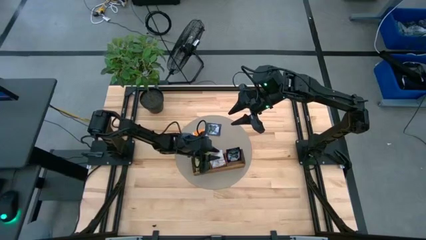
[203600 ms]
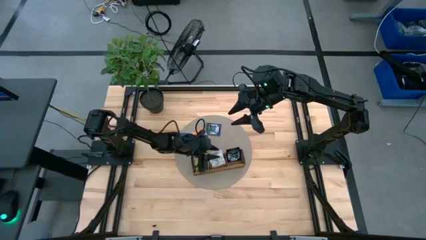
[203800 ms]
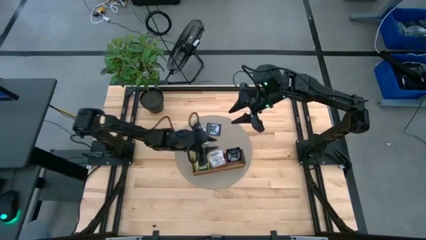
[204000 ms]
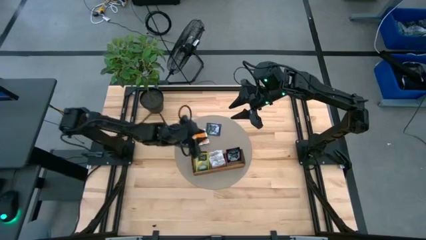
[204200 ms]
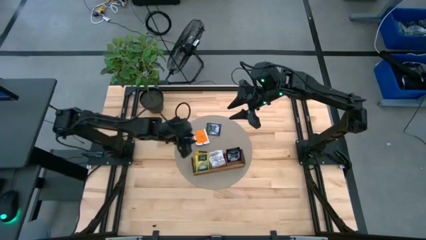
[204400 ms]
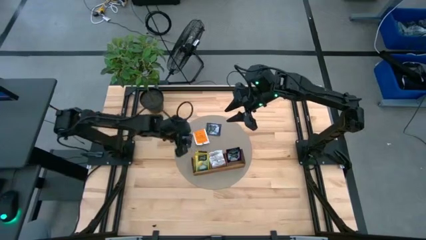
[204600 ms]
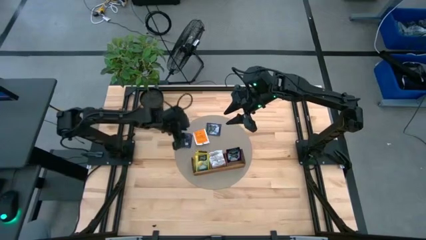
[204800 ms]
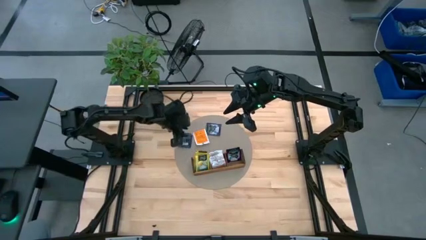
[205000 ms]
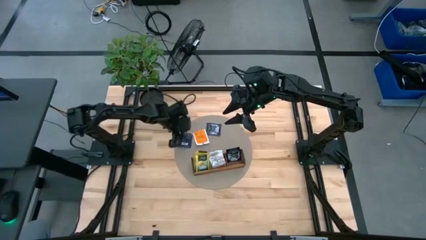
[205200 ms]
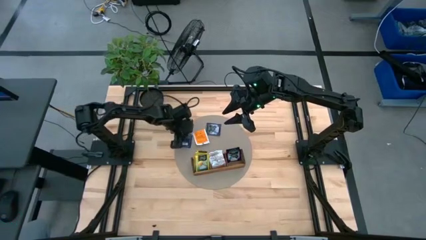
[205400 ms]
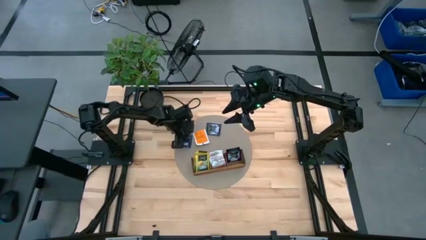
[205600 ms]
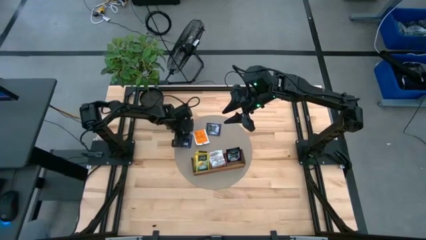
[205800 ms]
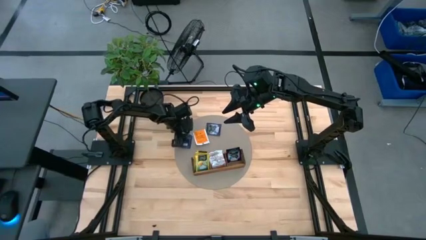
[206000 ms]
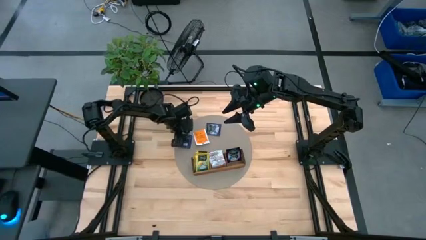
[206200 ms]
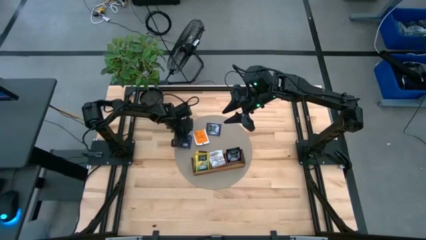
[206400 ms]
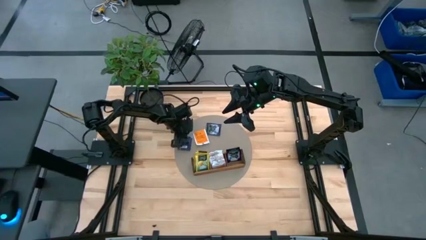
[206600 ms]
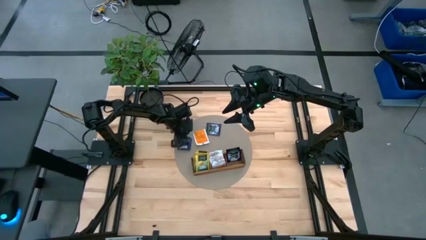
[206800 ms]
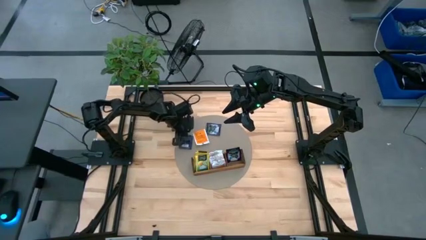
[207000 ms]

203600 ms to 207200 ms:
Task: Pick & Place Tea
Put the violet tea bag into the right section of the wooden organizer

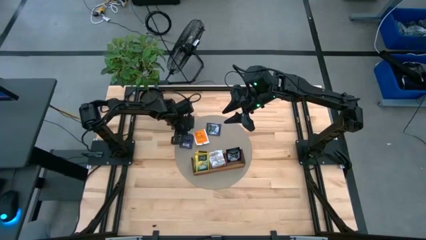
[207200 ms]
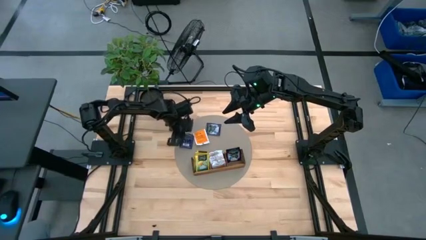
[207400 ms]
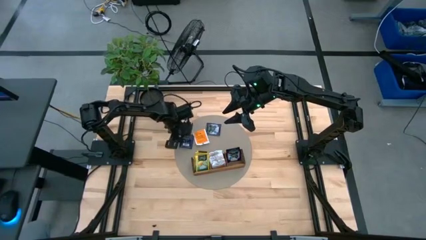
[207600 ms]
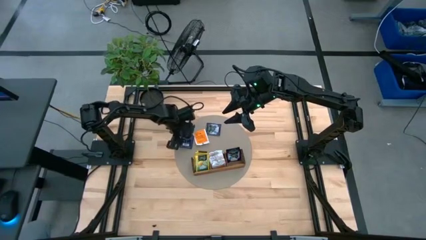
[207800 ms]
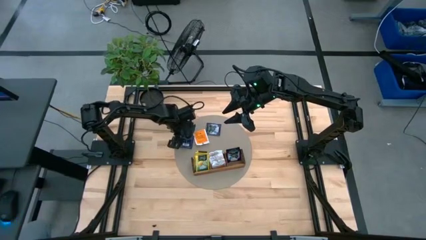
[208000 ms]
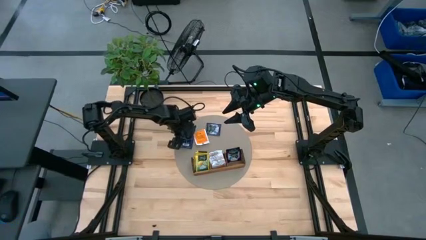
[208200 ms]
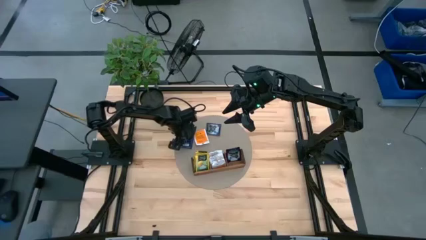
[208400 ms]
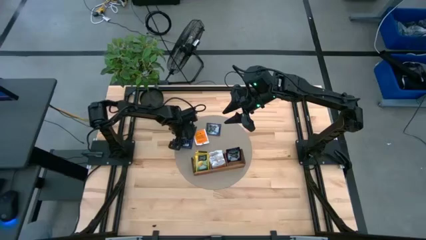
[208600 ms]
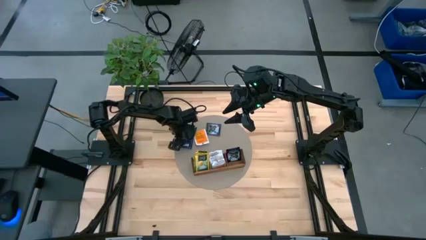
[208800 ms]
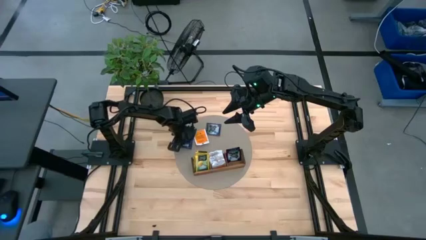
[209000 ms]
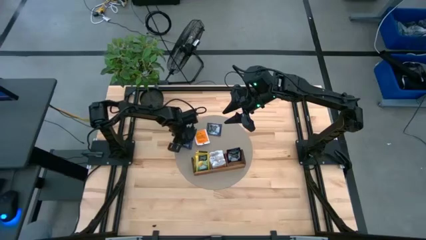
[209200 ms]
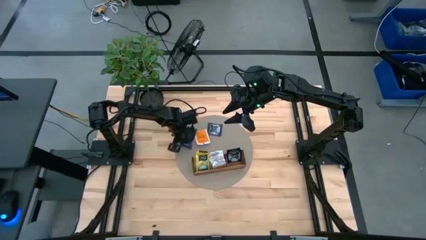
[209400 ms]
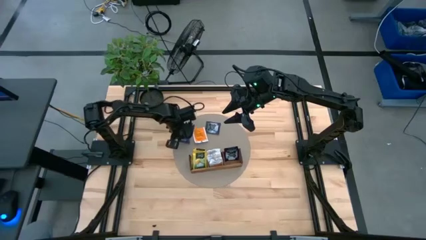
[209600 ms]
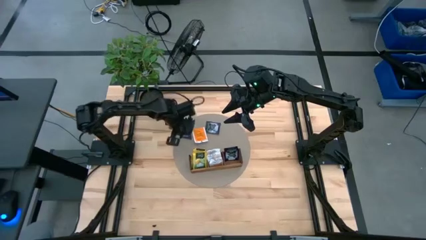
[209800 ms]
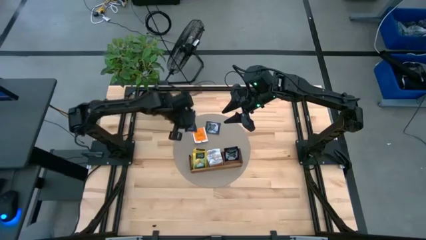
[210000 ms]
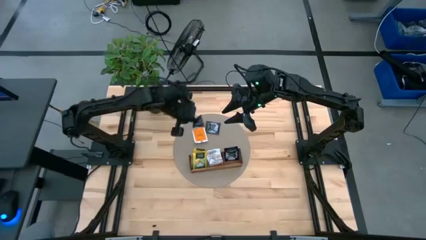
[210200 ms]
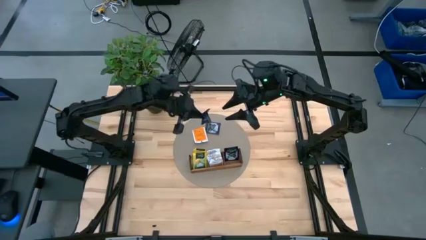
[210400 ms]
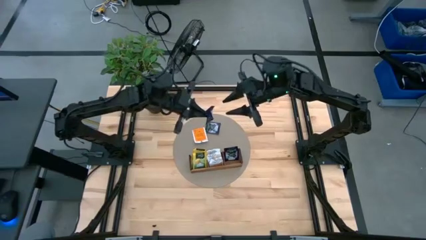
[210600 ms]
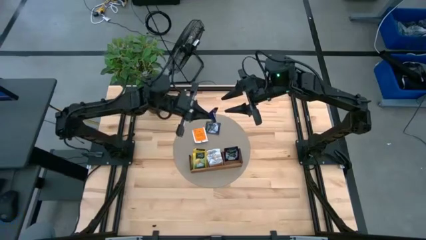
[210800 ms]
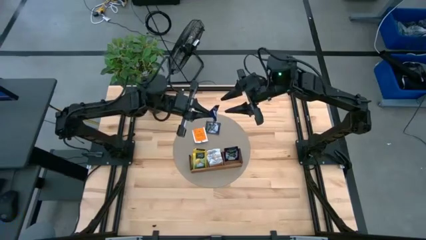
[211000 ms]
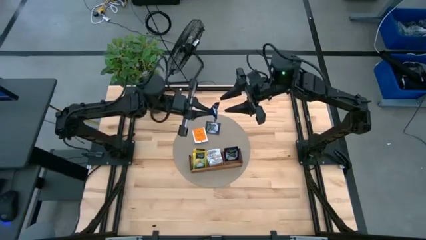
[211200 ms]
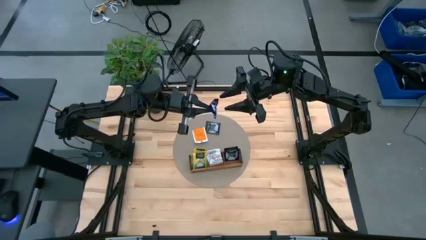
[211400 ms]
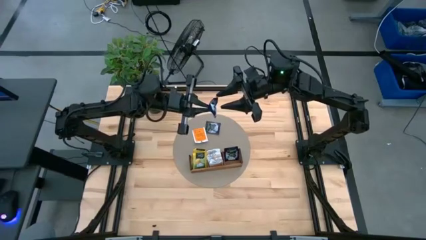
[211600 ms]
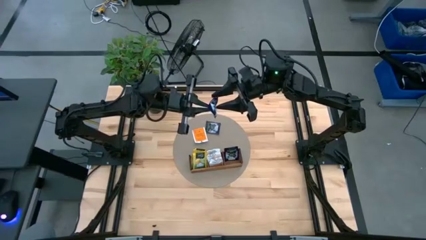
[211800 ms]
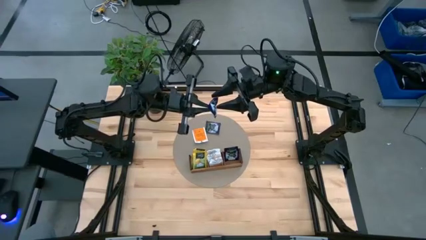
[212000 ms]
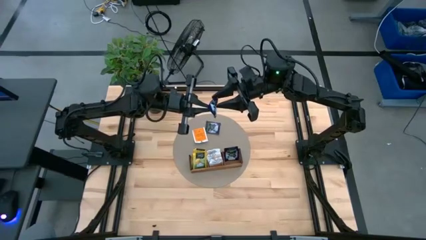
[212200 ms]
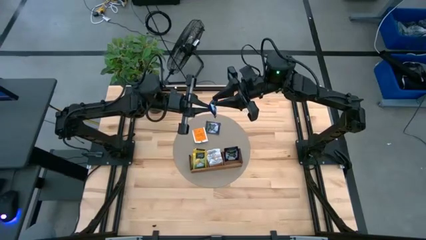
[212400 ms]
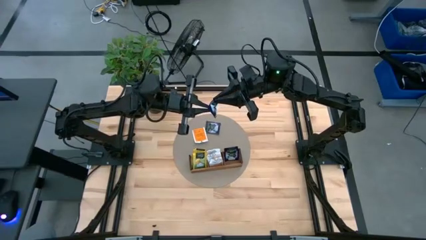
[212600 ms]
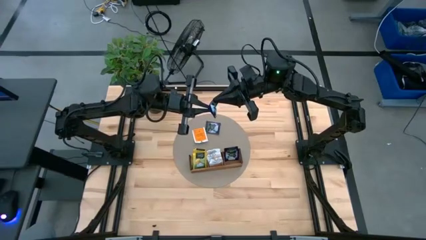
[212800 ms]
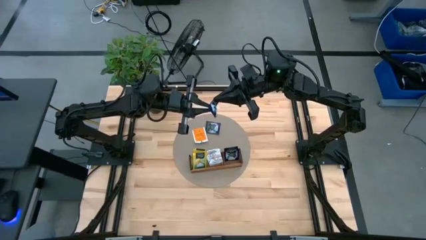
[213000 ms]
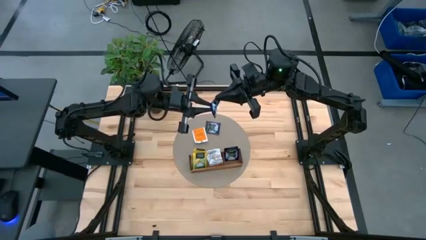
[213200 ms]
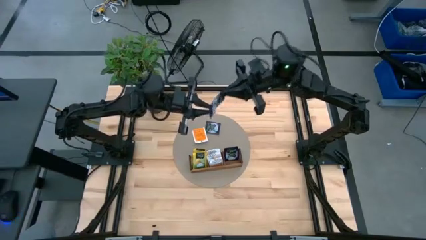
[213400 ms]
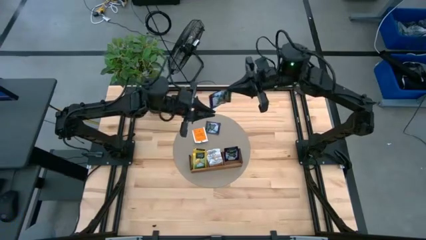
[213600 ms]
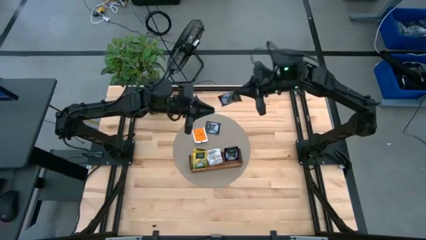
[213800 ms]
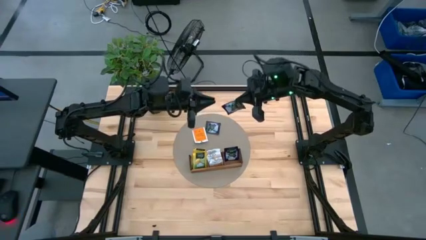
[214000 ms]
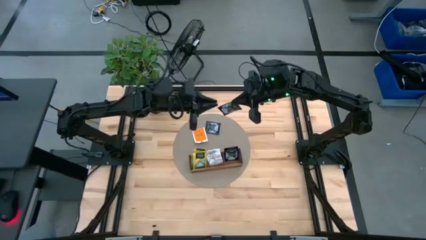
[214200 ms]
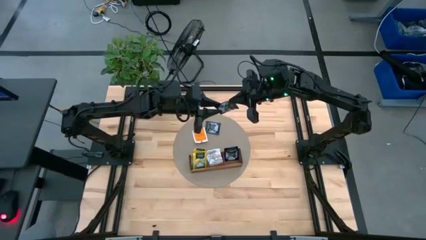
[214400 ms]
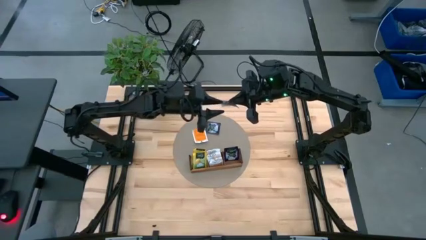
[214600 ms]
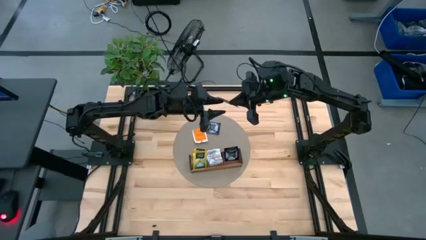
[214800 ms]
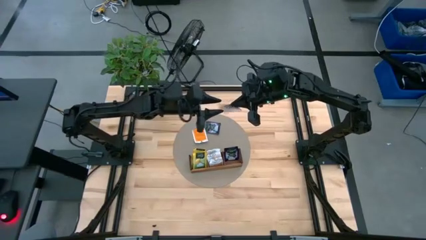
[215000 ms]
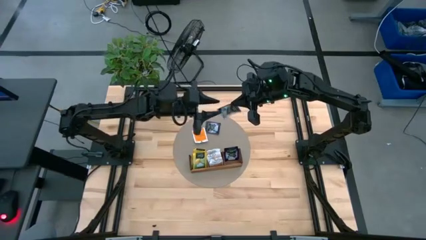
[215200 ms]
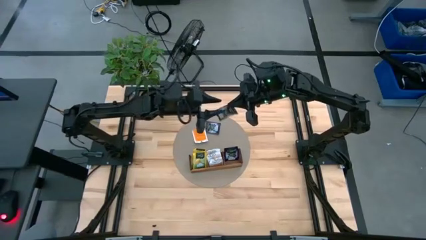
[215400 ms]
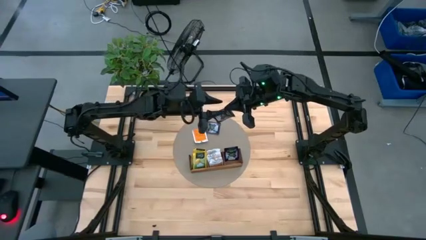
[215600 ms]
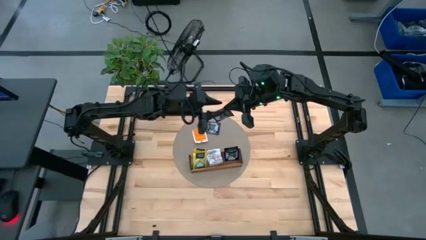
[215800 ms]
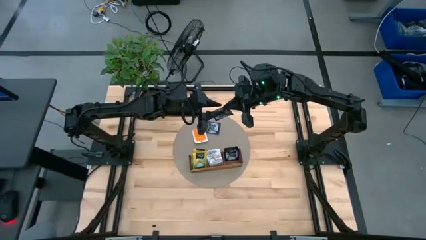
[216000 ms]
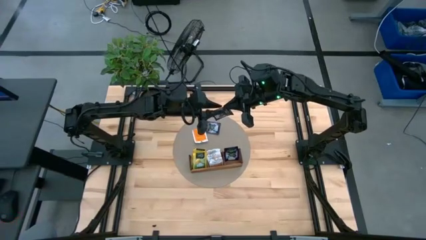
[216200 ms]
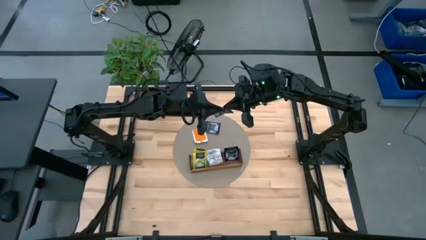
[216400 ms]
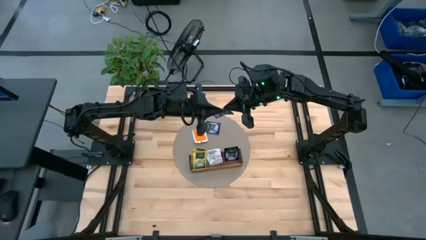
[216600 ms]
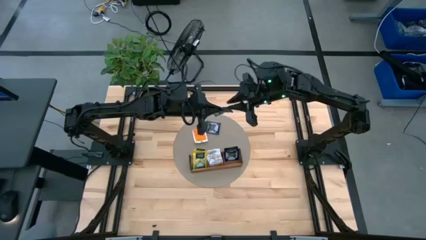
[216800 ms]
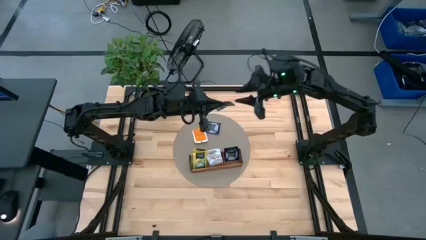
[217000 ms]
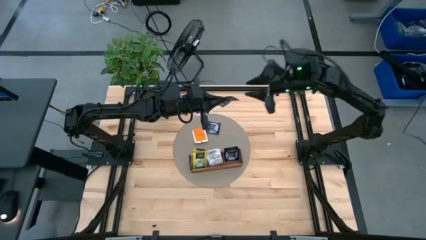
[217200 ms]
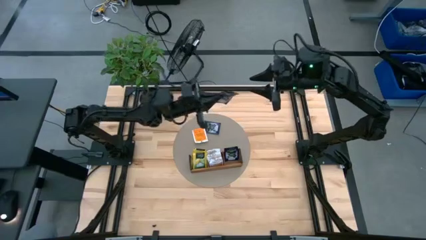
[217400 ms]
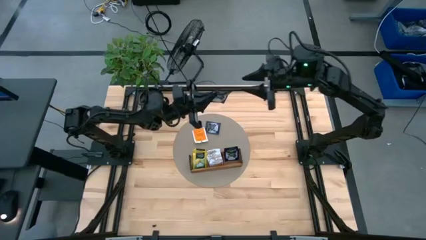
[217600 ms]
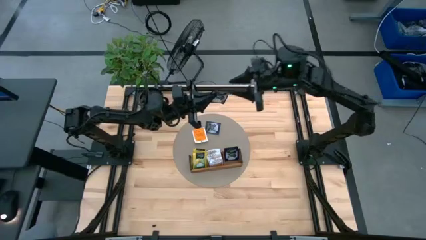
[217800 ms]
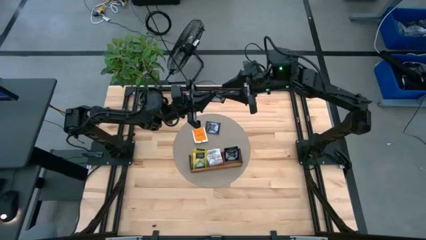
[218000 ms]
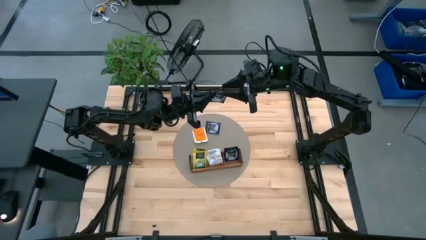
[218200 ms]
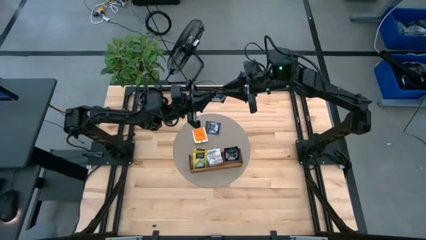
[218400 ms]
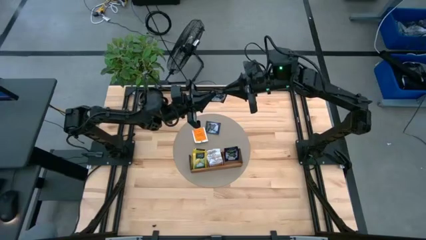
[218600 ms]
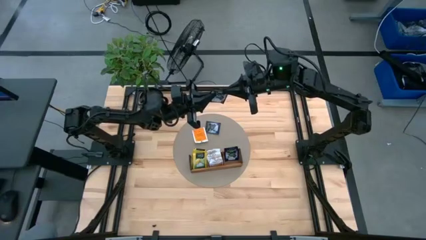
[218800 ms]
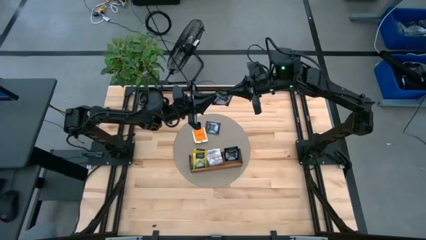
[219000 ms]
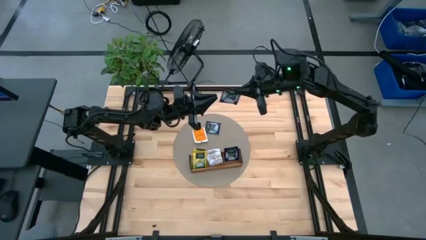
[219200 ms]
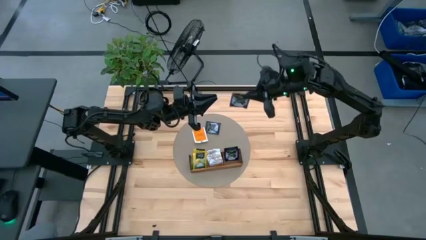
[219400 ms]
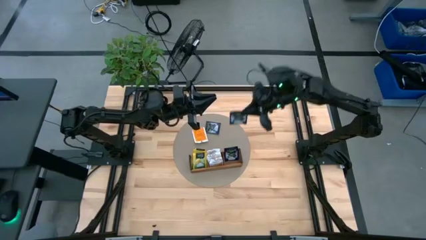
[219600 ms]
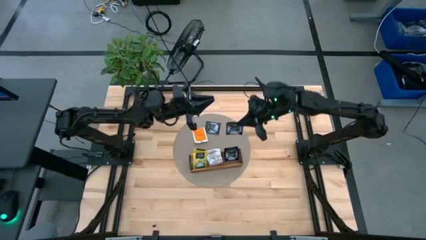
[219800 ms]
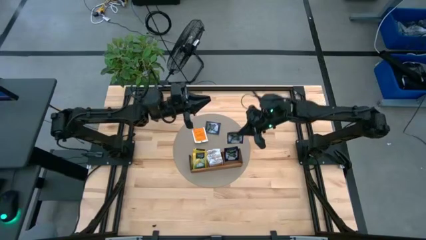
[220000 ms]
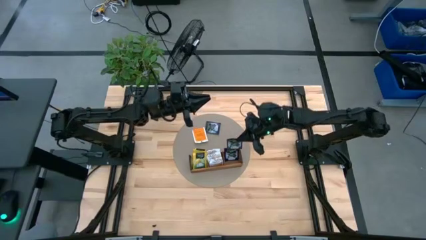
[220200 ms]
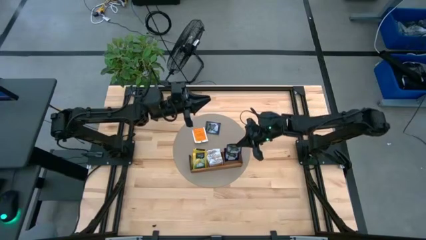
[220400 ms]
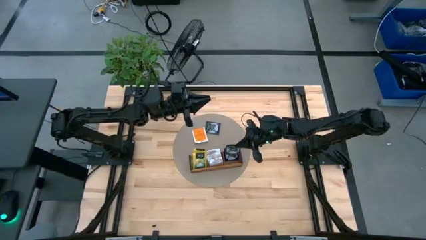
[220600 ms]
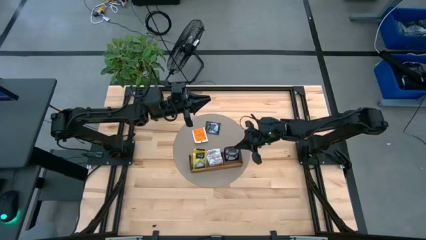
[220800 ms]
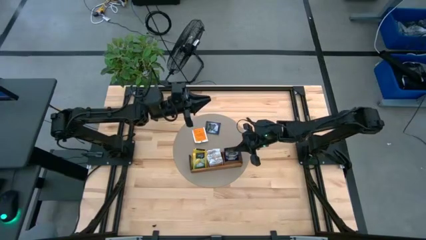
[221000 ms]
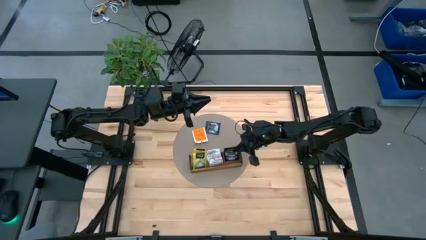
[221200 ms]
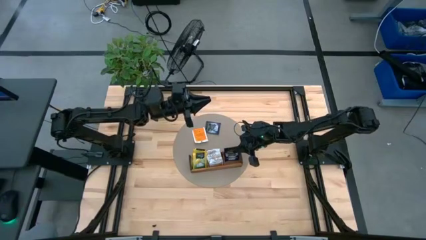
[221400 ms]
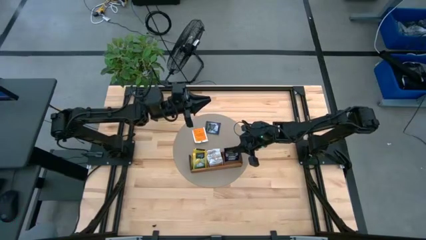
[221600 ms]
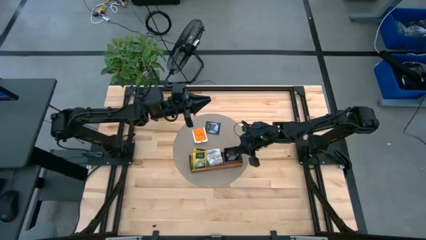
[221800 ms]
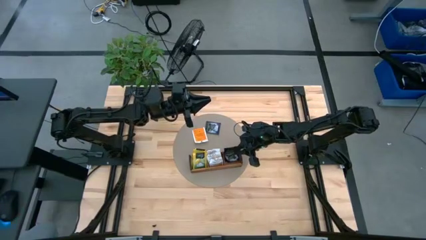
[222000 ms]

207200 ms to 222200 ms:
Put the violet tea bag into the right section of the wooden organizer
